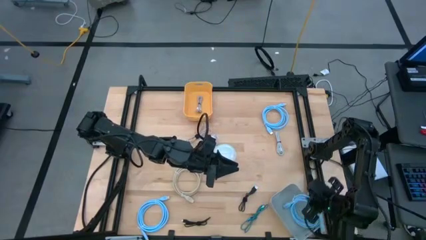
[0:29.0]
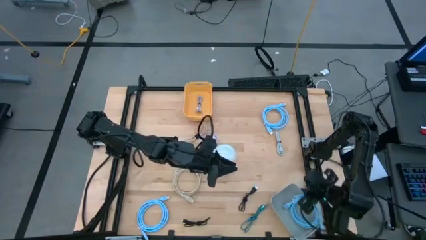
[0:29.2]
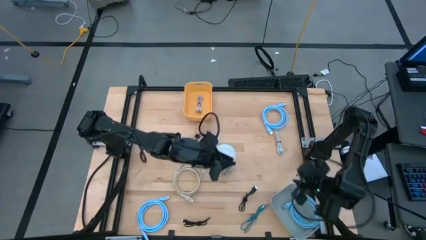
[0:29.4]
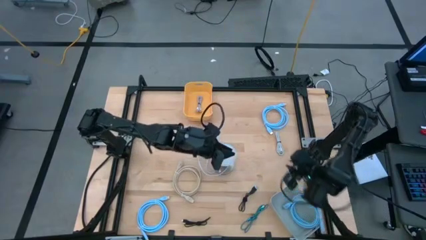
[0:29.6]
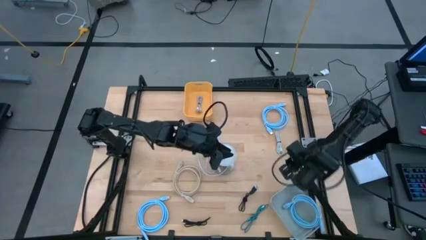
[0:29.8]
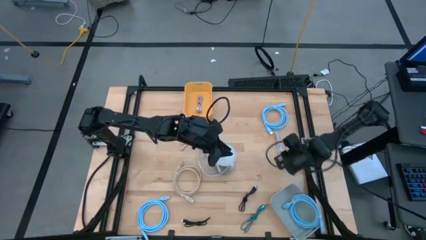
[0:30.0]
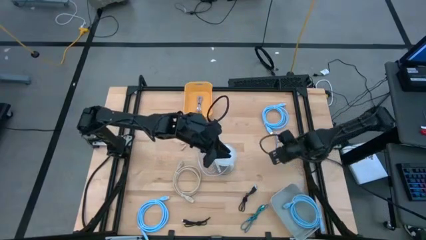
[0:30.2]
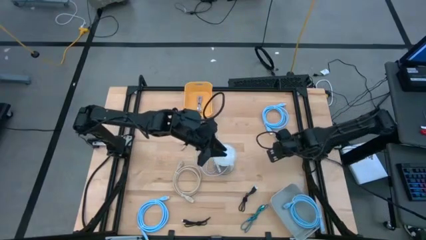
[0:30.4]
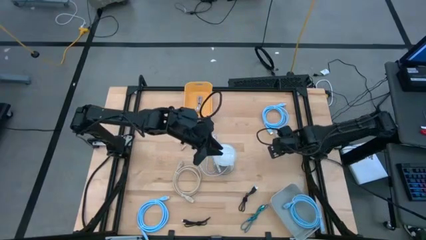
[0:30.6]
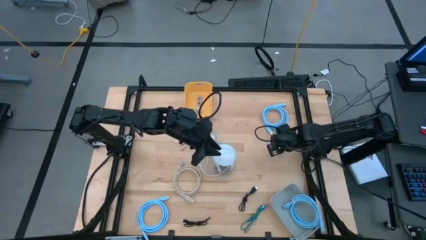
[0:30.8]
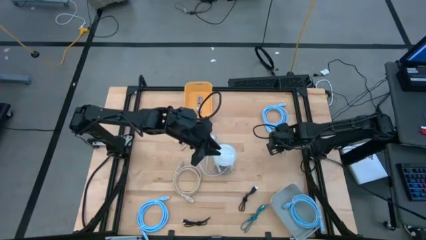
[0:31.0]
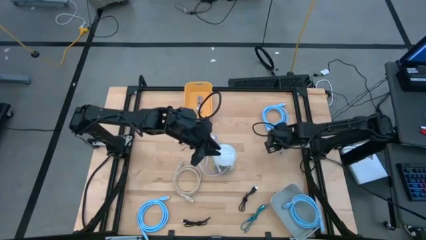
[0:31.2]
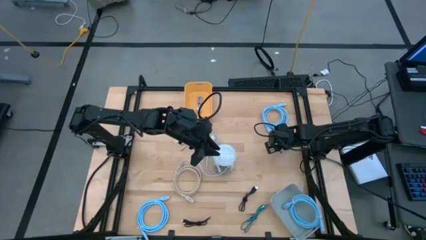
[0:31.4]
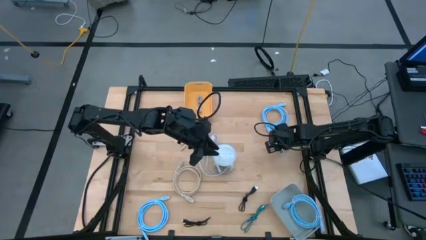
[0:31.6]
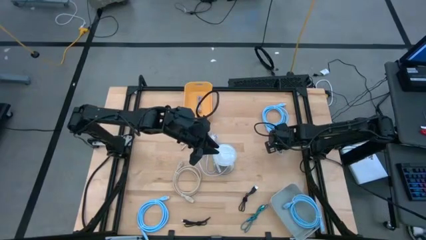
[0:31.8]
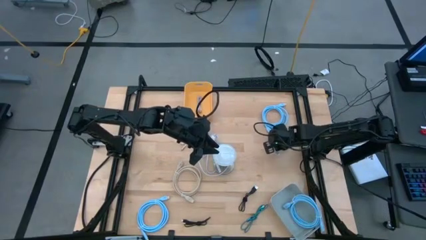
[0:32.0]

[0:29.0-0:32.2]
Task: Pick & Place USB Port
Put the gray charger cable into the yellow bin

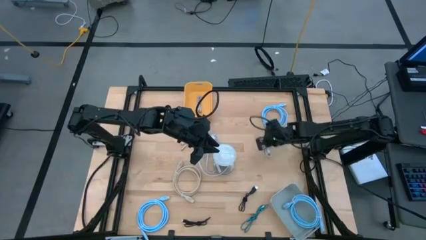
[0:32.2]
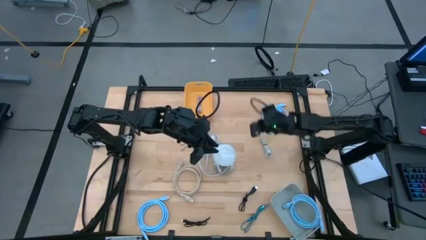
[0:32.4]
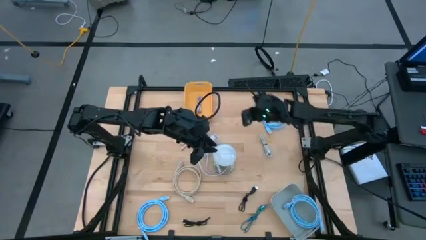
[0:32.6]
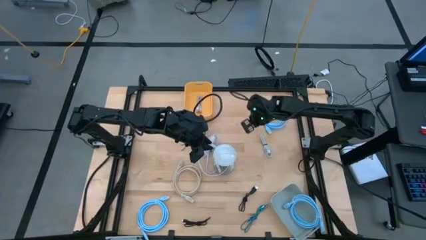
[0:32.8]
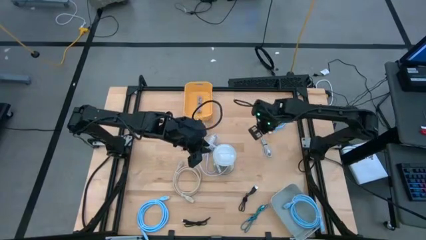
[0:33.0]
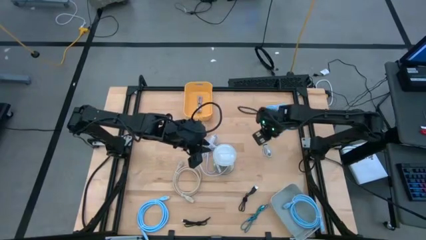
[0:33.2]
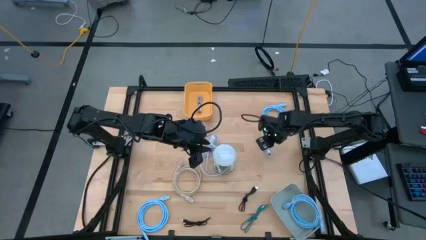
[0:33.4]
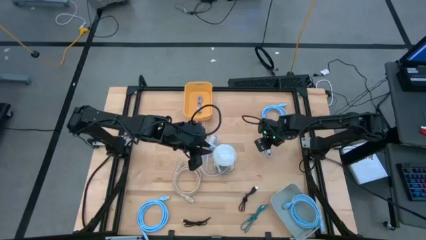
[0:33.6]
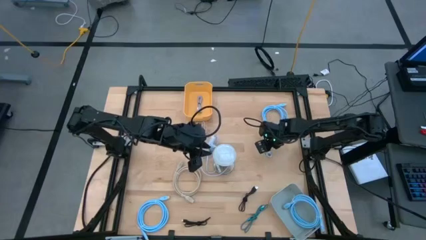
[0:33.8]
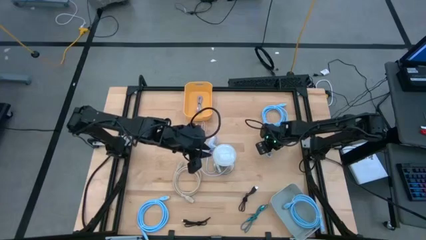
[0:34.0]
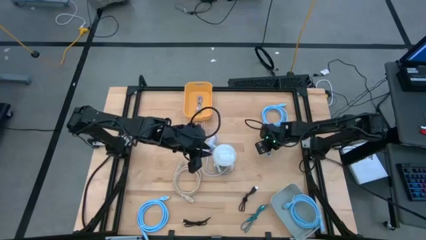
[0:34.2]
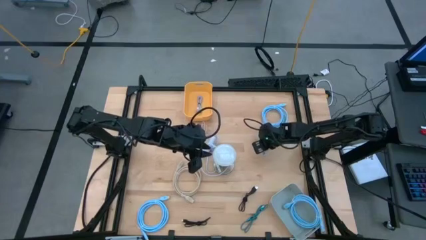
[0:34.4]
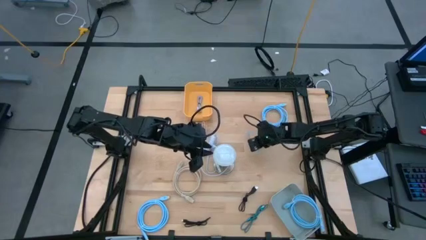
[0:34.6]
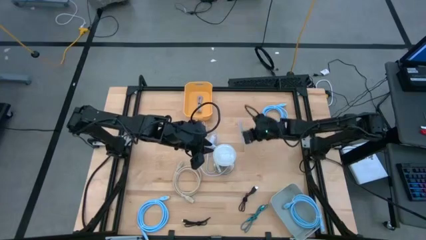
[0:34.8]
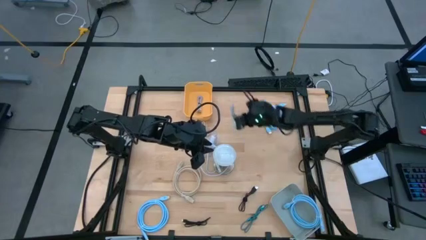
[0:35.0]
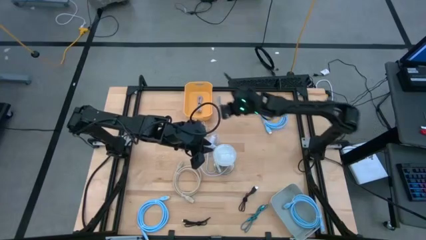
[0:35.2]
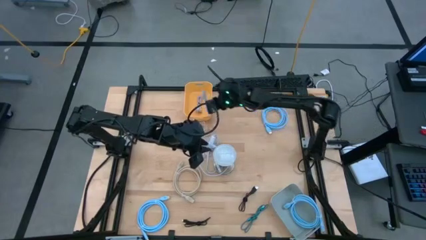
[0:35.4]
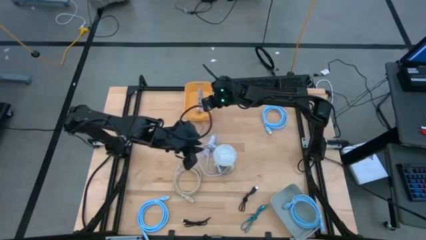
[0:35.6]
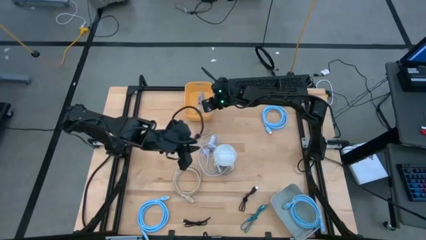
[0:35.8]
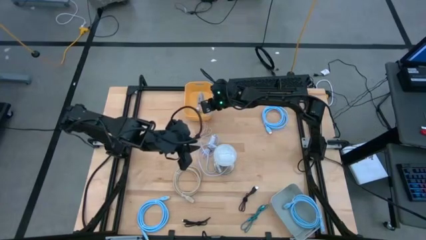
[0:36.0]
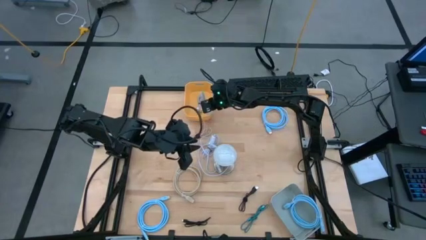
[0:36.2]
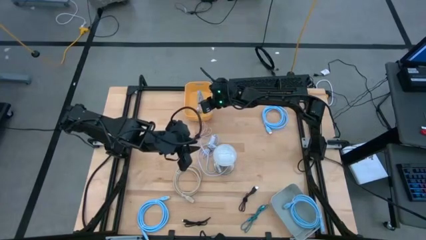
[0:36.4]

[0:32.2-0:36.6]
Put the gray charger cable into the yellow bin

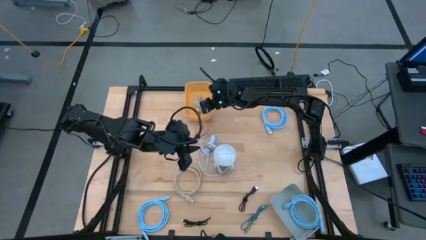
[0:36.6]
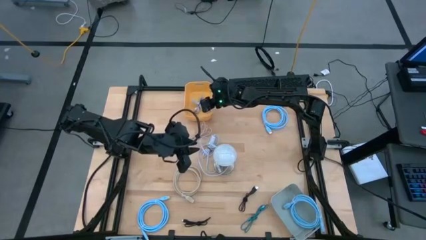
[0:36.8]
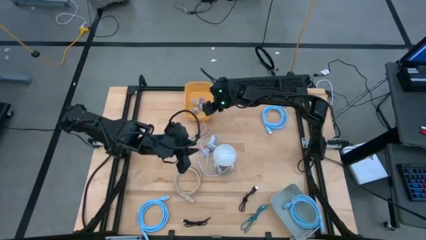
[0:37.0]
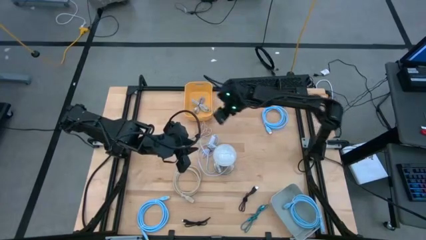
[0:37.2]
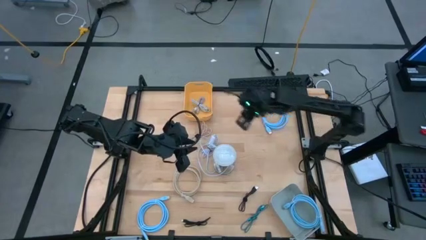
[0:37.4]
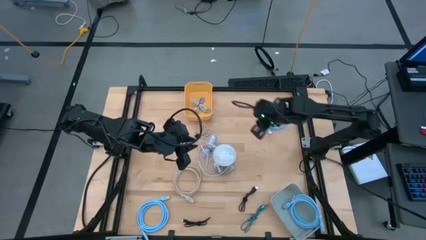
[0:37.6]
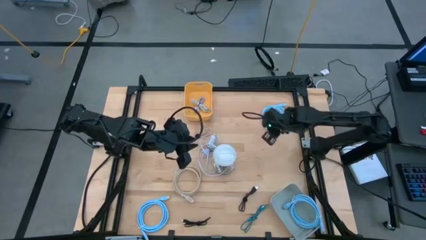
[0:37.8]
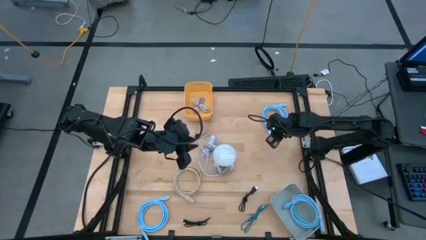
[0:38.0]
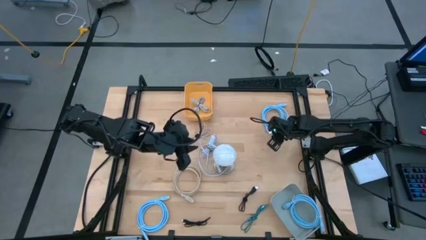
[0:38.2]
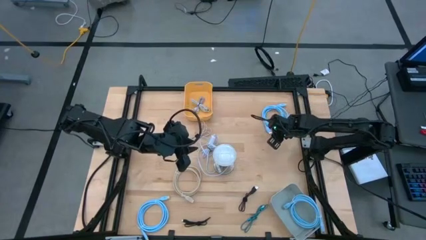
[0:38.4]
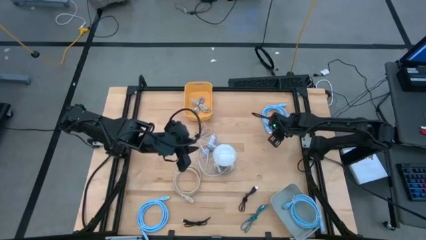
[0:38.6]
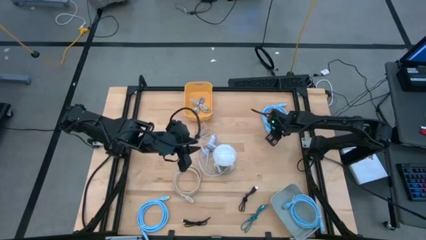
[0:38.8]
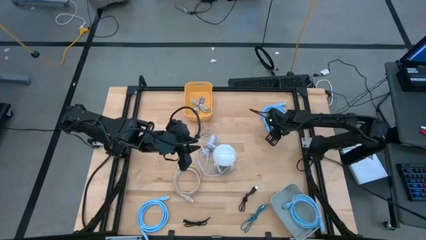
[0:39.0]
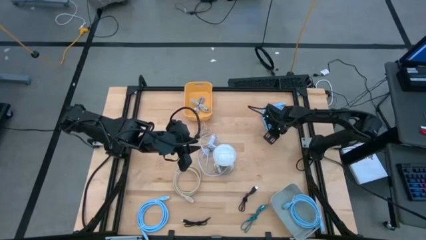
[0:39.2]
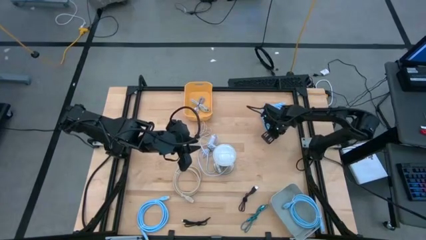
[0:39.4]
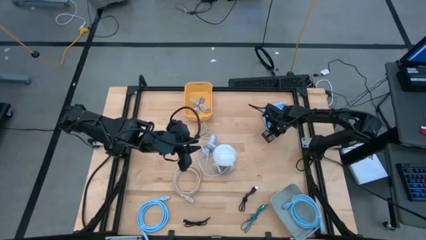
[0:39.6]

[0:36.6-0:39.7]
Put the top blue HDMI cable into the gray bin

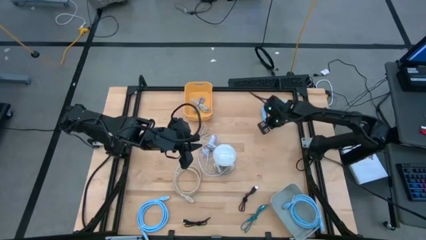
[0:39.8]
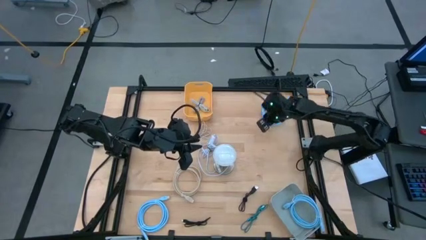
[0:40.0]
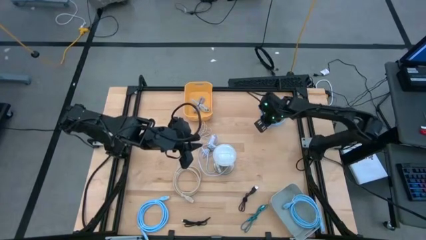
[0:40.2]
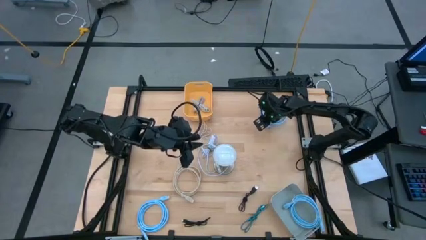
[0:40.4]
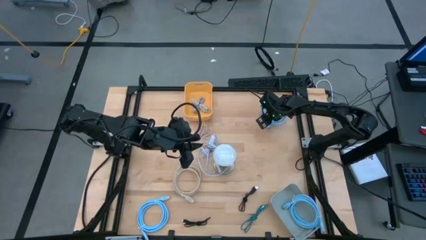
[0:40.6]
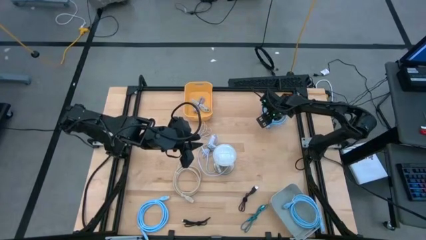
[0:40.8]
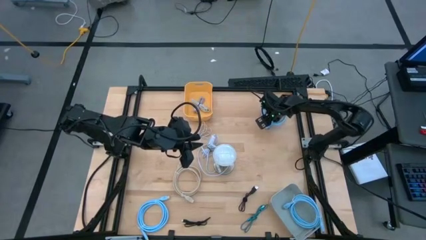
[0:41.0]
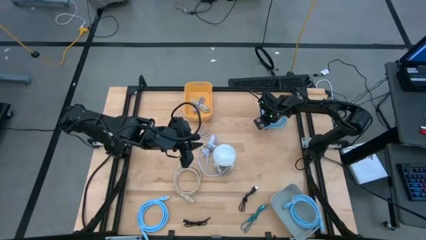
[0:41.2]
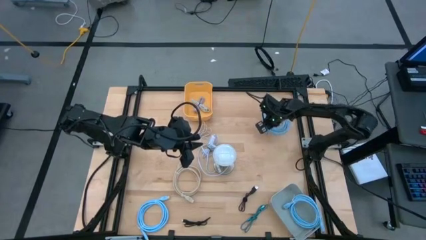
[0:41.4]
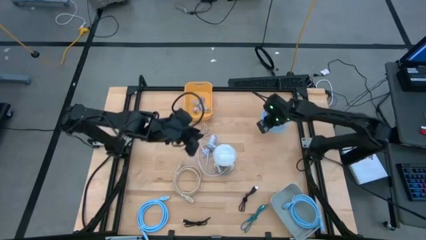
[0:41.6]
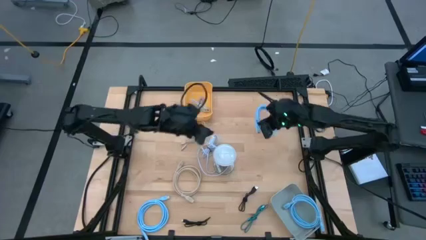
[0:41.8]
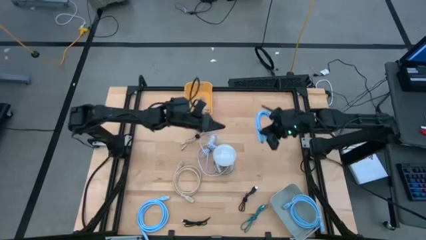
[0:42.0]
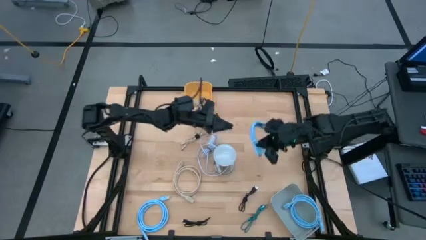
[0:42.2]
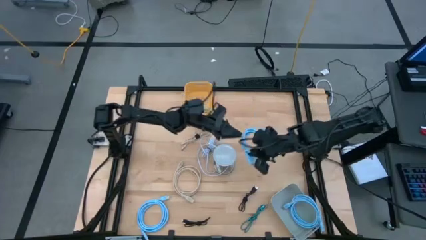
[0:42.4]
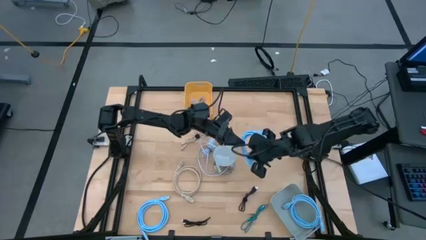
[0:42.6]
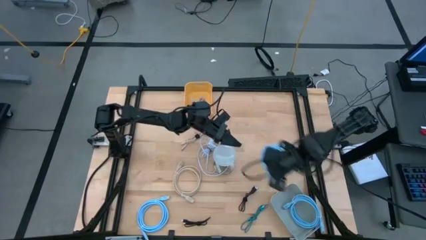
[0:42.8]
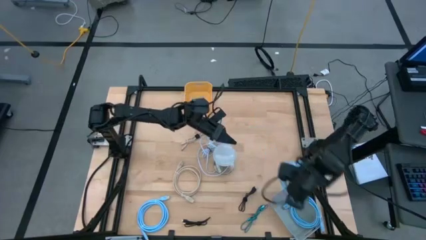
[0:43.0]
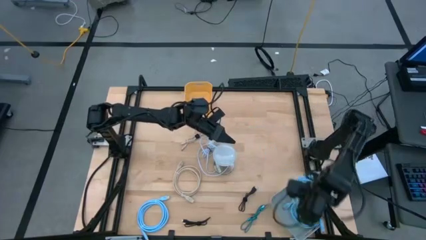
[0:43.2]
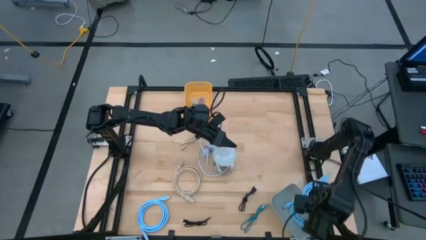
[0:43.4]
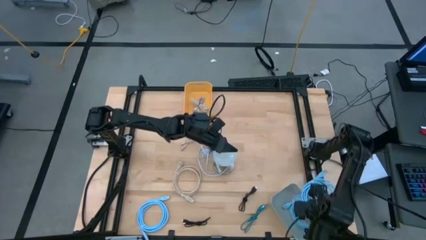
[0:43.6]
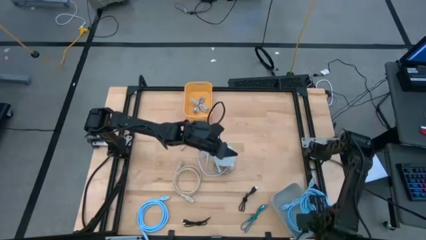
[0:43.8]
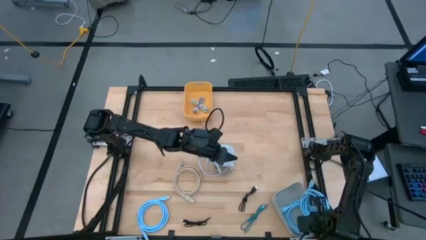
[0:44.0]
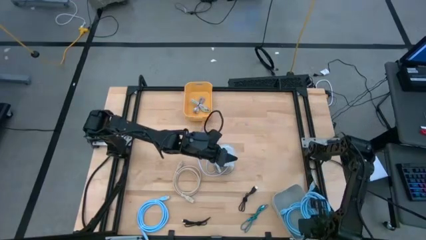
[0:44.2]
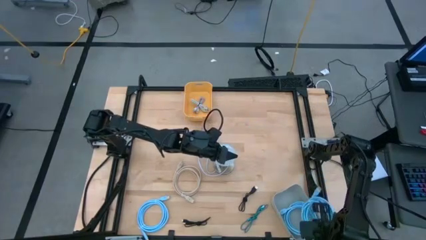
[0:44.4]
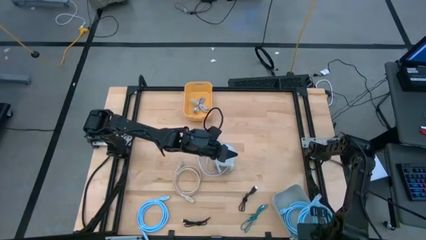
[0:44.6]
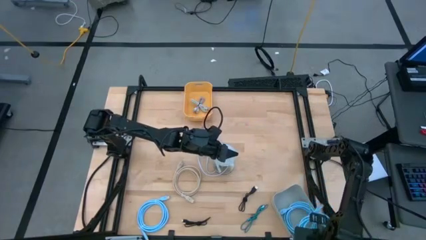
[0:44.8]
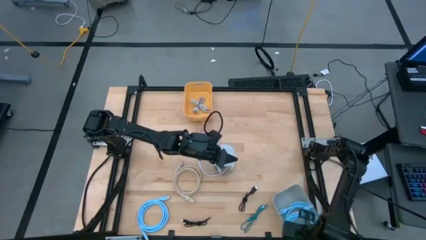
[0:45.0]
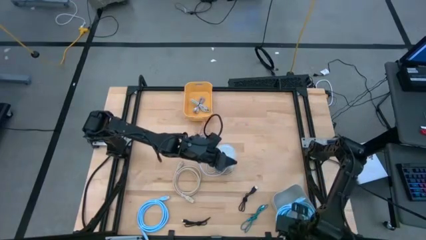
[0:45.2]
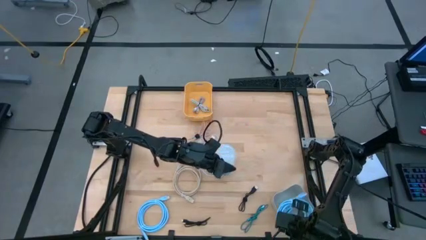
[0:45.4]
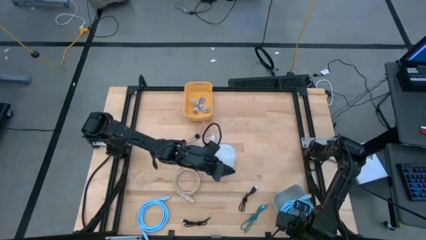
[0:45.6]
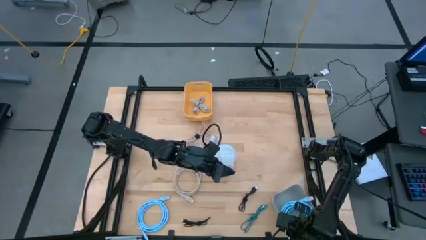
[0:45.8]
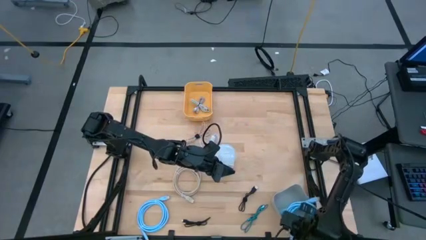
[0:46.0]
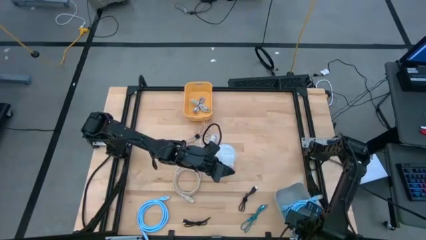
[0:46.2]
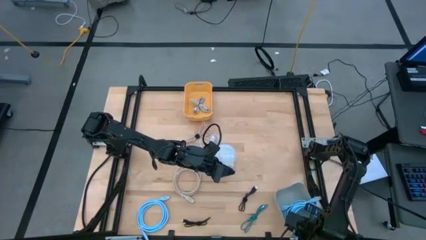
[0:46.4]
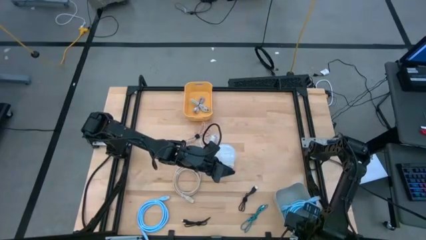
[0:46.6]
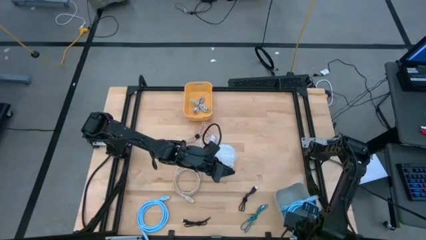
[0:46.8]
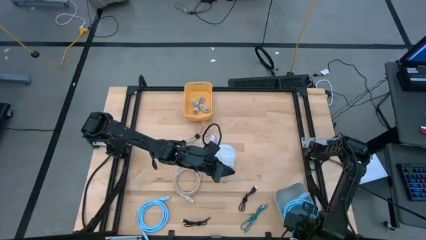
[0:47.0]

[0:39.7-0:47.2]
Put the top blue HDMI cable into the gray bin
